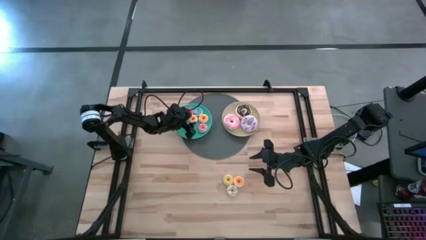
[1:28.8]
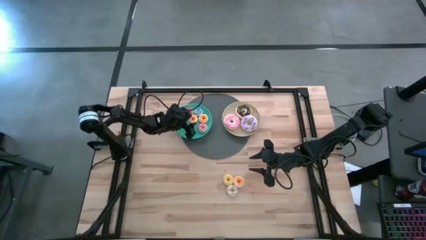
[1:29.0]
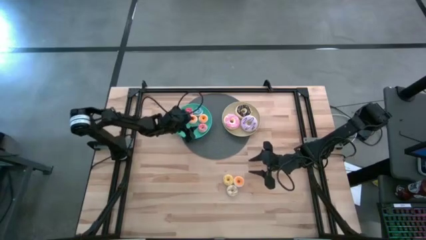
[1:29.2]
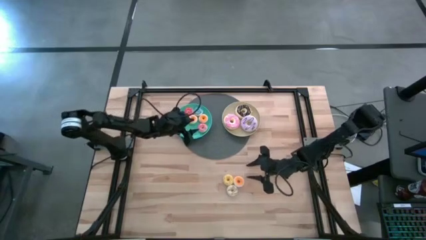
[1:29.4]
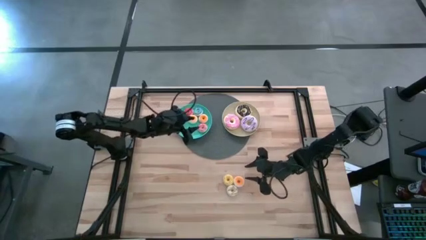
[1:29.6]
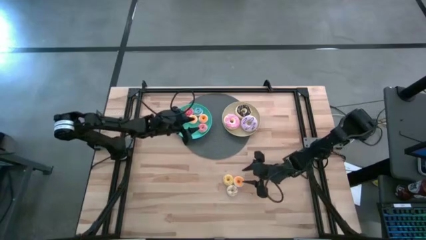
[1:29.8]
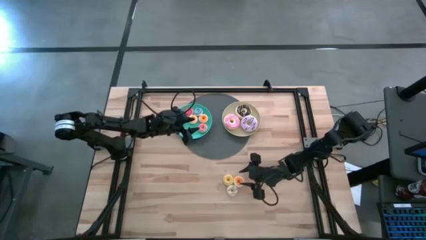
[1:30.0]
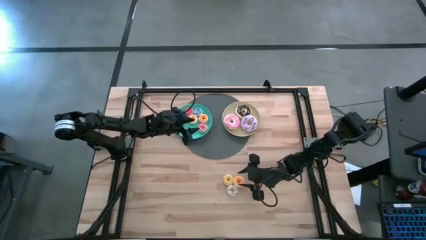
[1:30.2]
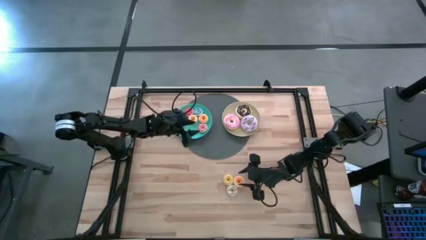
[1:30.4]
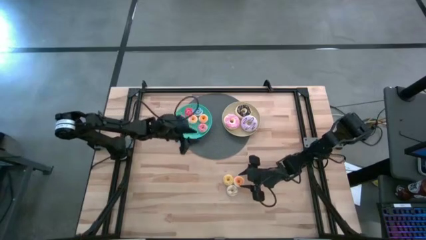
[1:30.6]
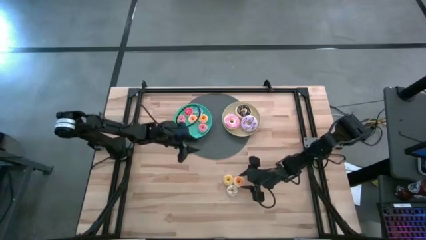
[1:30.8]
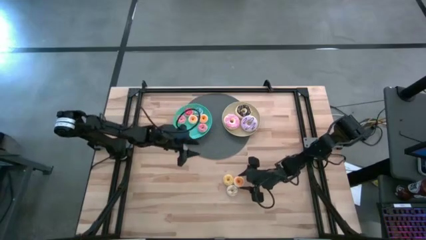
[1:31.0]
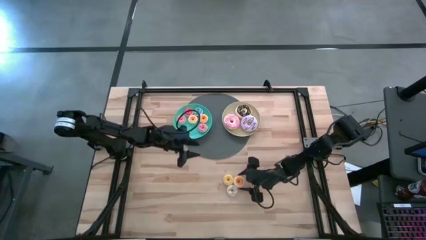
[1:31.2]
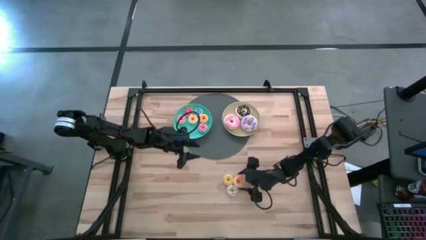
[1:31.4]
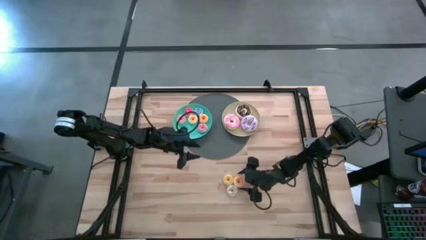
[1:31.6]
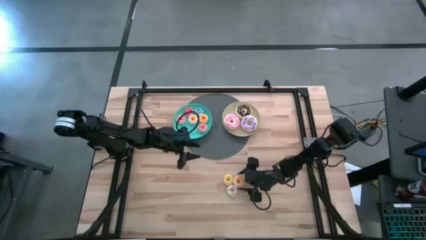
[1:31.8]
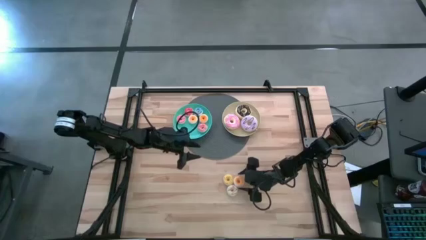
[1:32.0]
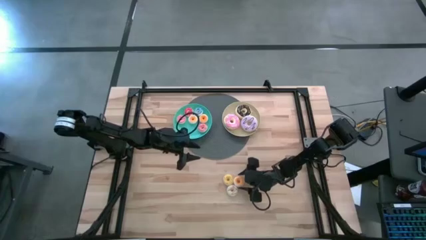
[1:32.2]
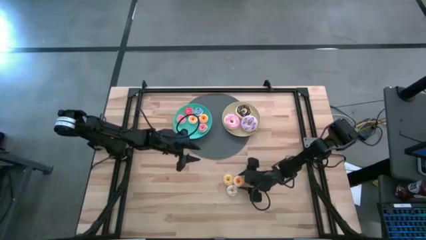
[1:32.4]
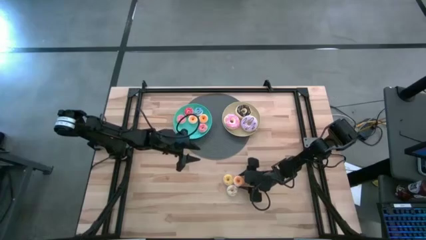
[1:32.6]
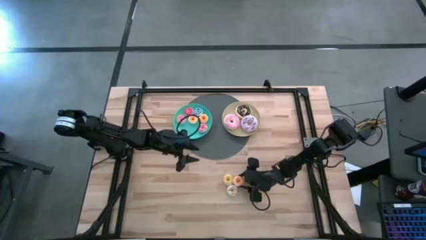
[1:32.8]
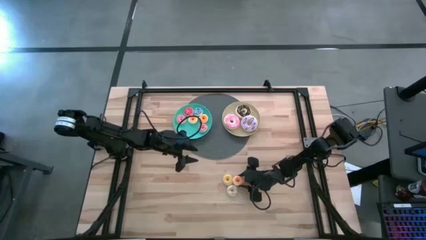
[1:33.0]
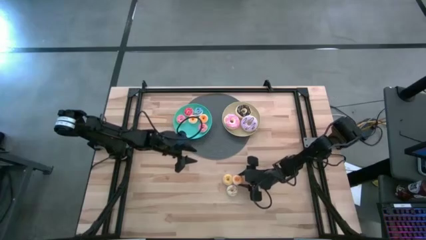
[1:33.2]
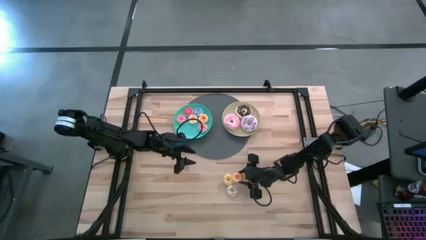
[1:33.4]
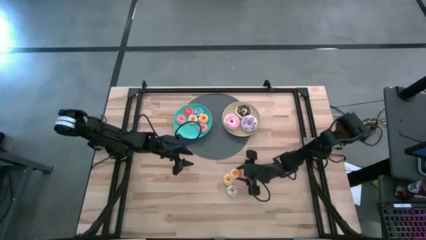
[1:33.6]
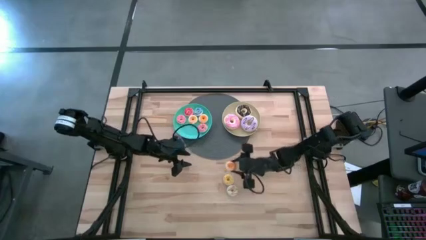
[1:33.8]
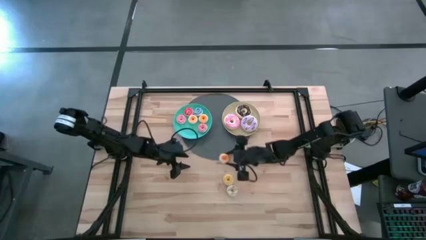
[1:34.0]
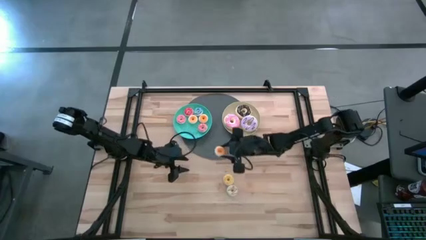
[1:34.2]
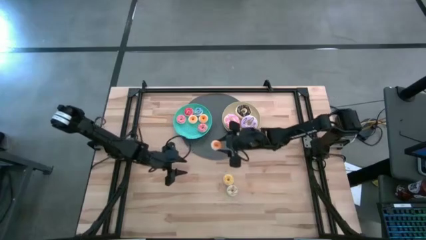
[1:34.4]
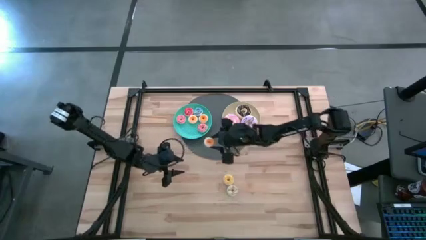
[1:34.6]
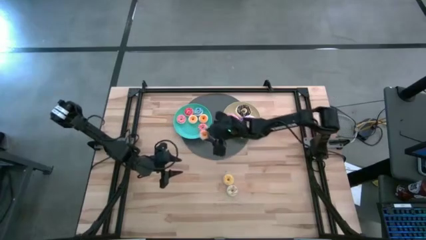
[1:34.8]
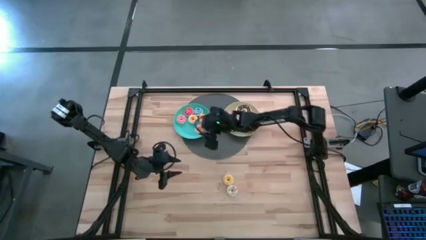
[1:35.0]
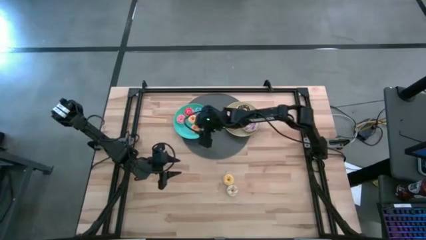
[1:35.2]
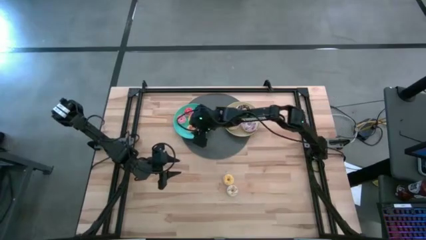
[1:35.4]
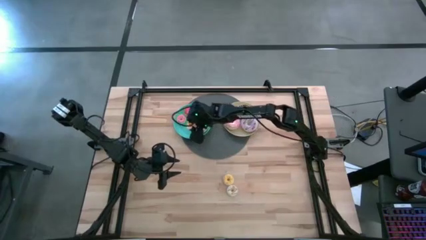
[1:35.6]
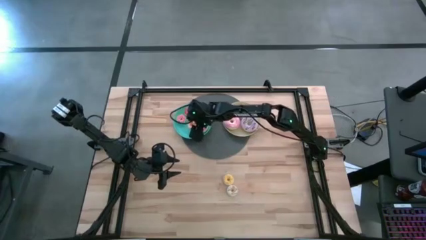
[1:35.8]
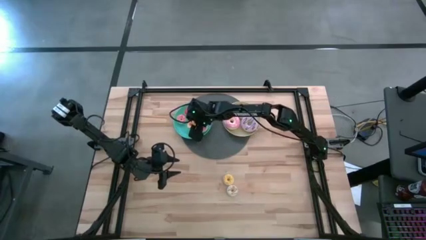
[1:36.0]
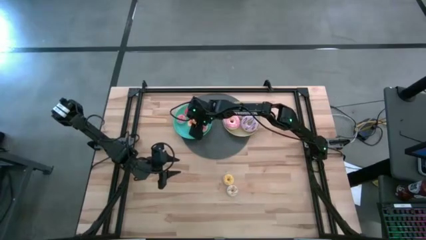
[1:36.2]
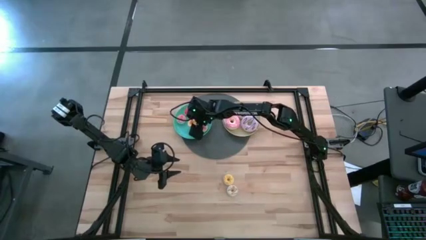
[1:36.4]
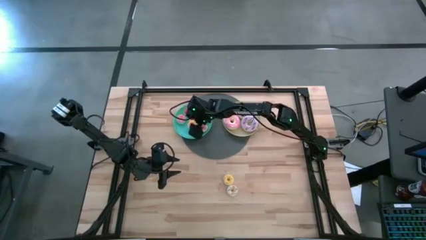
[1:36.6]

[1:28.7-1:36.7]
Task: Pick & Place donuts
Put the small orange donut on the green plate

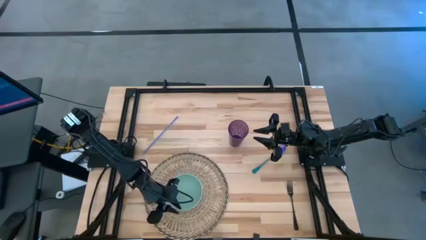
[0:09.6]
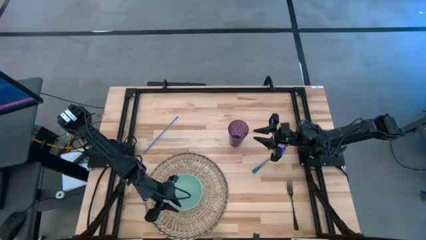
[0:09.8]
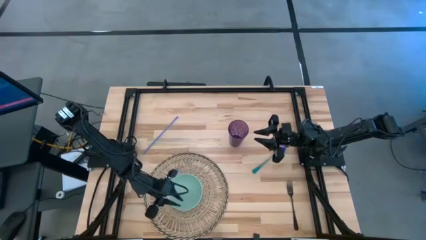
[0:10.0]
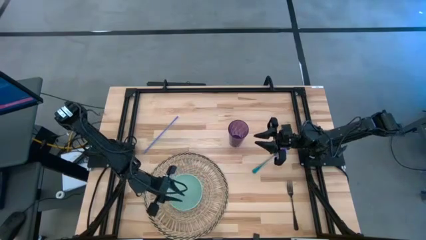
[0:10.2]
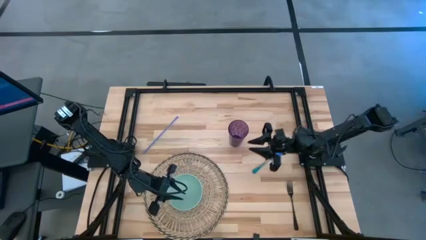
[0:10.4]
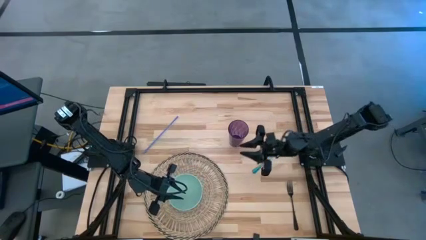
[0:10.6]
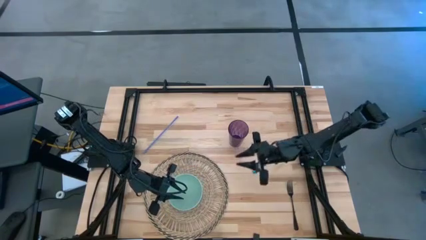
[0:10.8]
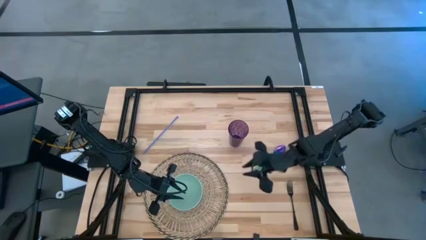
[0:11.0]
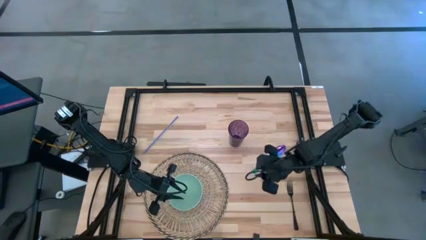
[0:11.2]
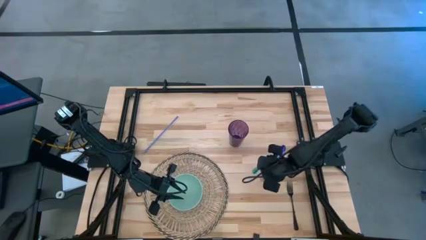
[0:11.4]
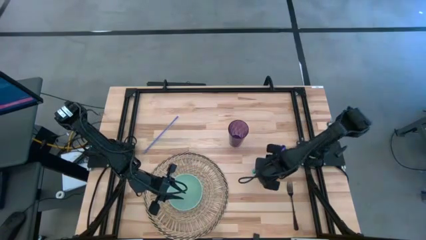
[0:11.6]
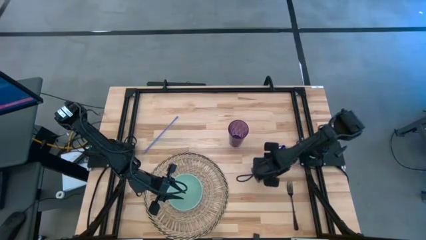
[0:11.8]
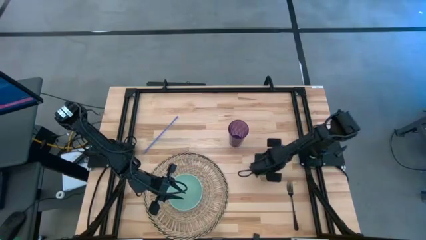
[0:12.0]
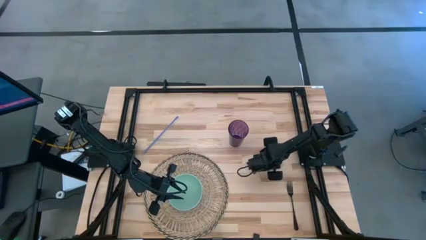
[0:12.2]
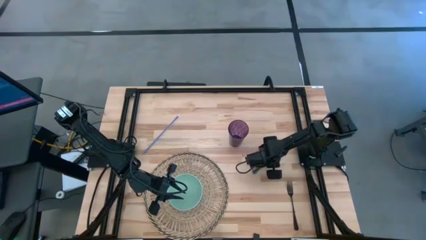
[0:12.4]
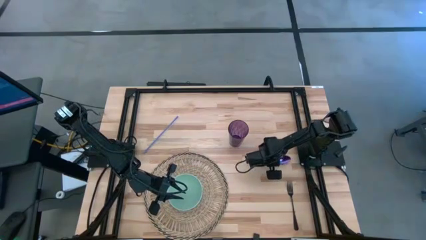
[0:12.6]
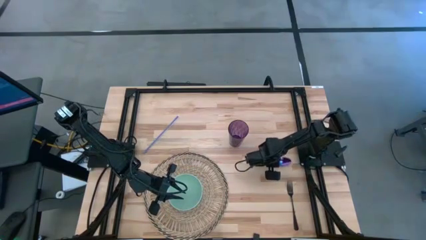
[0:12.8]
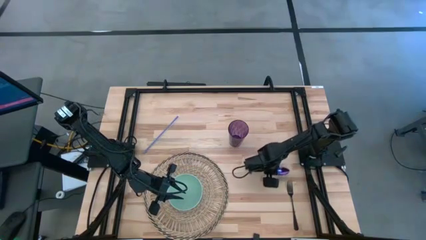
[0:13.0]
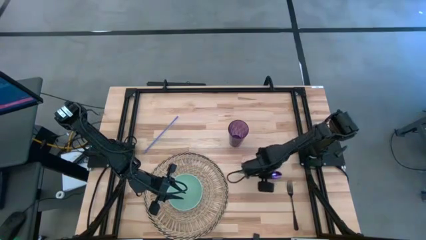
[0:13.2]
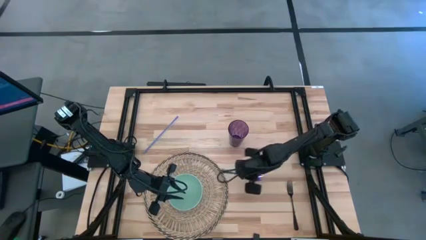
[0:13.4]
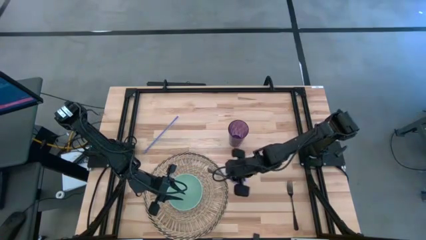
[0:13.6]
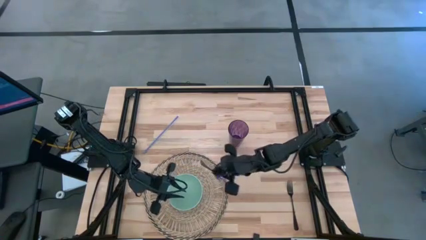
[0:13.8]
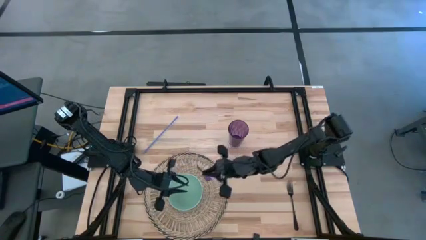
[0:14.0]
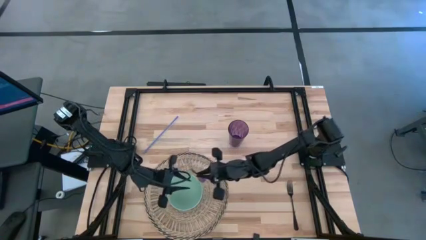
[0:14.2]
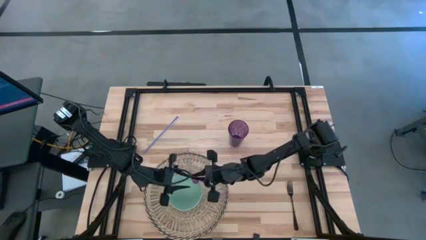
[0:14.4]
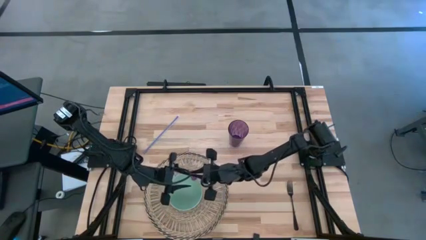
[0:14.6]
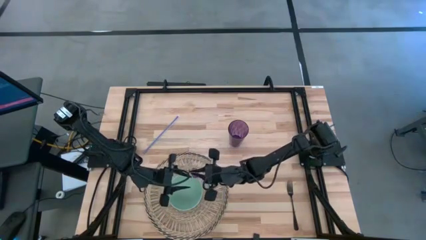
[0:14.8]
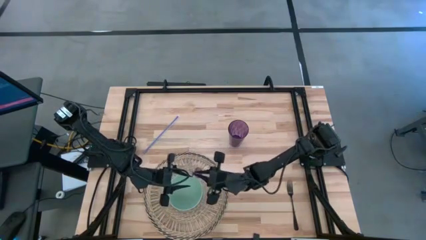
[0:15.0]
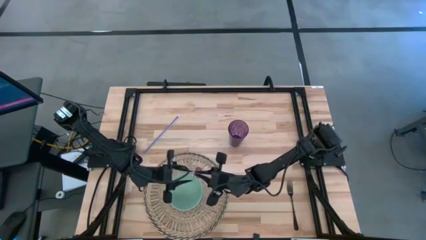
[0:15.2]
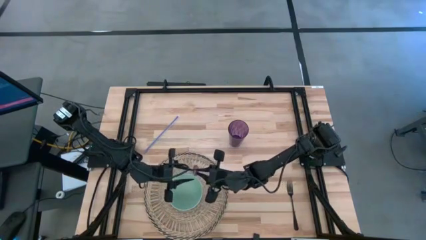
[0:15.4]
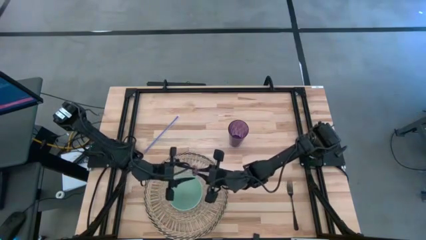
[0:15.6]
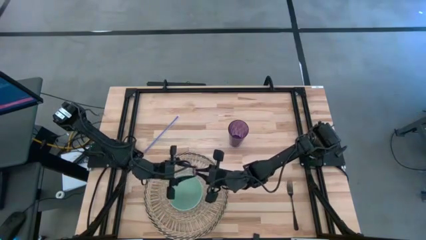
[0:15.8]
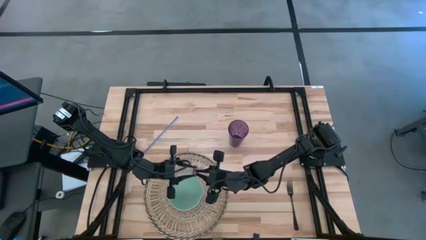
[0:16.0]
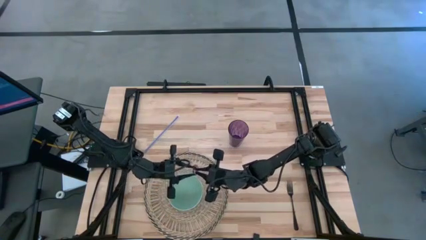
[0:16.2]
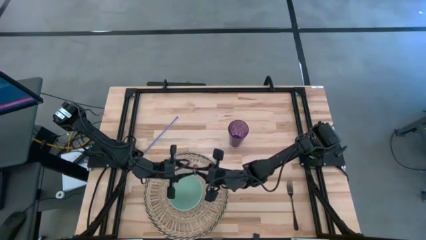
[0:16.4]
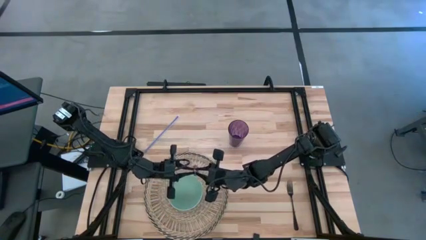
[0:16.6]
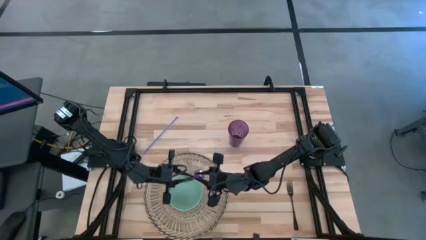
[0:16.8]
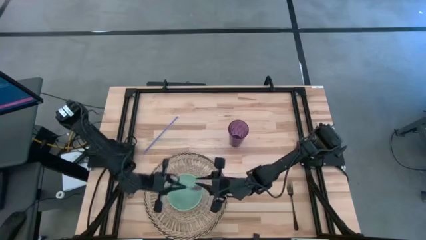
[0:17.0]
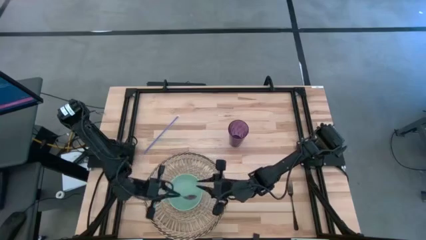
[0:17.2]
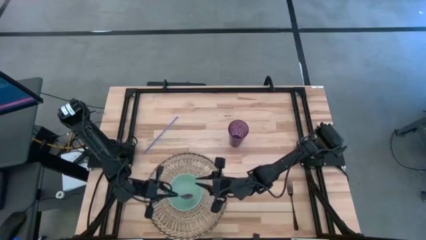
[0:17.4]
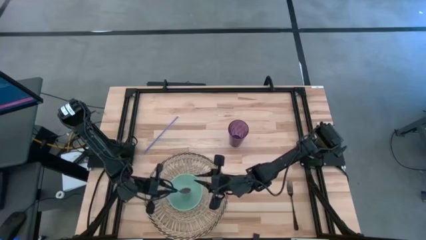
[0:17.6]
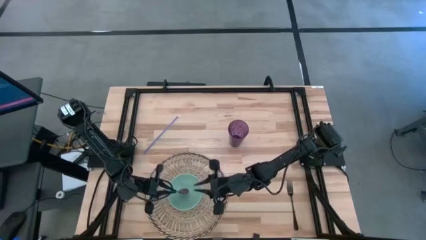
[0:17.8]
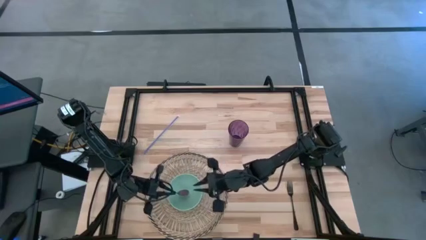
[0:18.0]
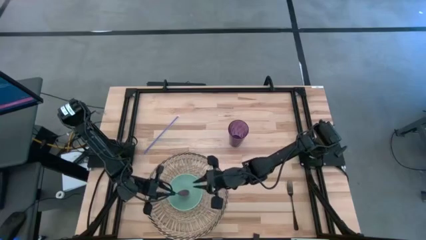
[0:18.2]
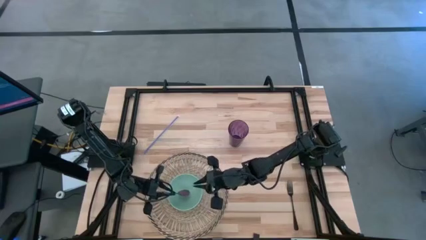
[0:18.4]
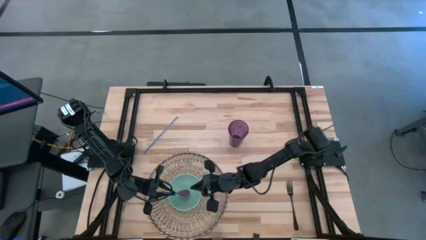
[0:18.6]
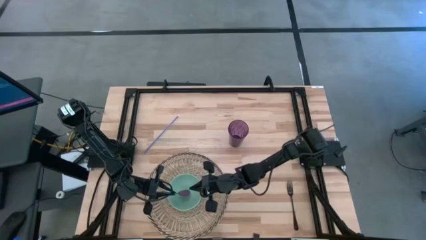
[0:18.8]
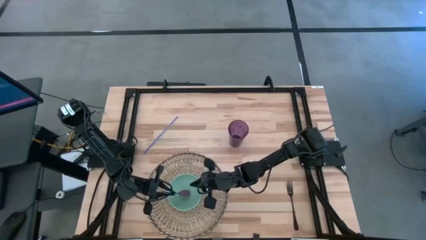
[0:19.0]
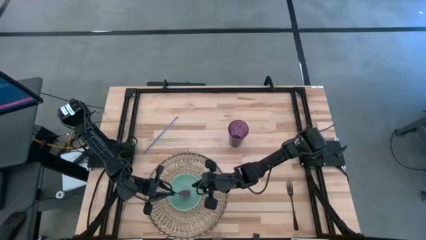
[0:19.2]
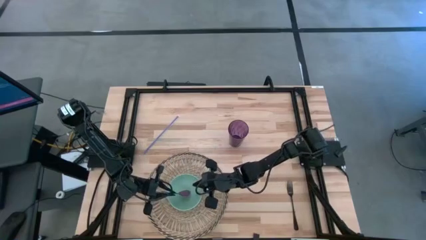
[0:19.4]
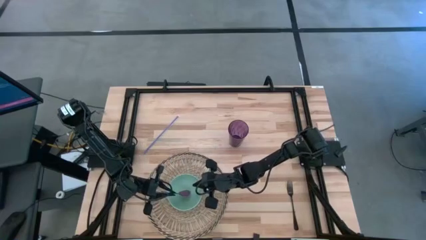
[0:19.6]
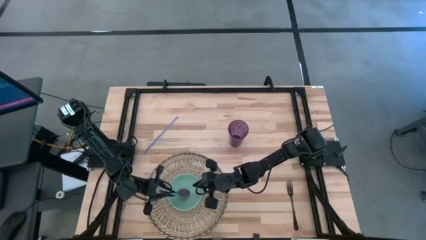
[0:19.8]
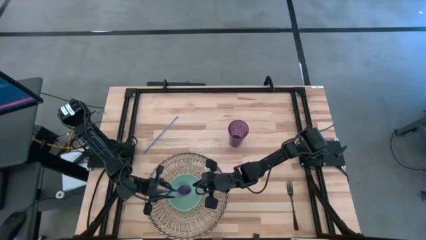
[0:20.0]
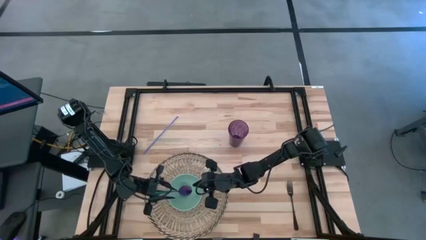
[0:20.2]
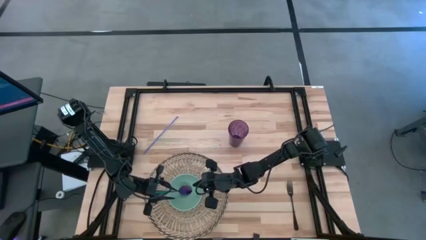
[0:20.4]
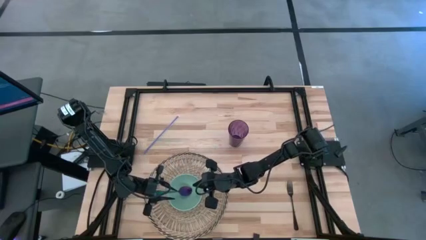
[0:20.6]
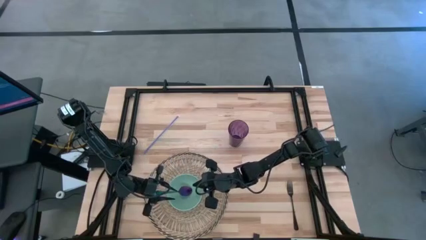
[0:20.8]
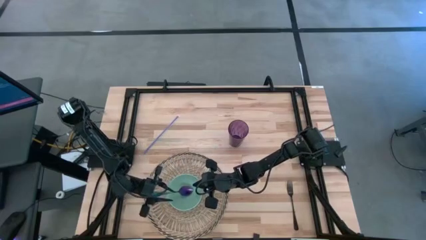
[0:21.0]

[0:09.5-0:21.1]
Task: Pick & Place Utensil
Put the violet spoon into the green bowl on the brown mat
